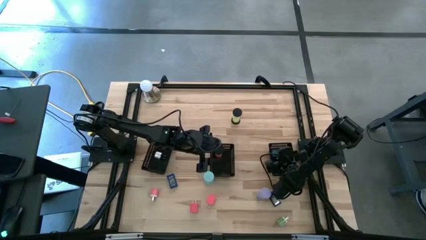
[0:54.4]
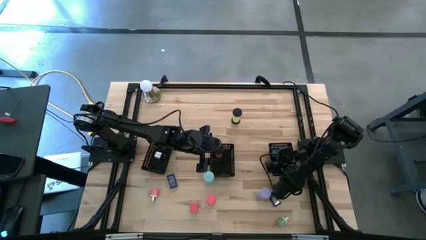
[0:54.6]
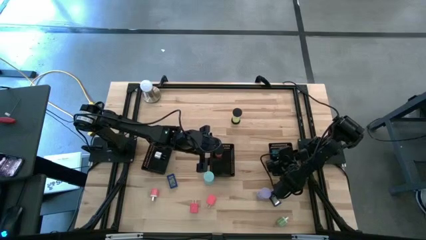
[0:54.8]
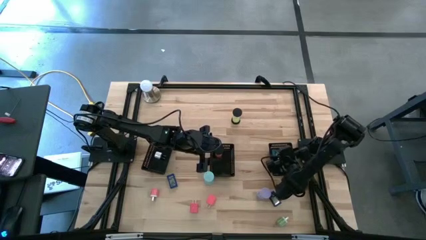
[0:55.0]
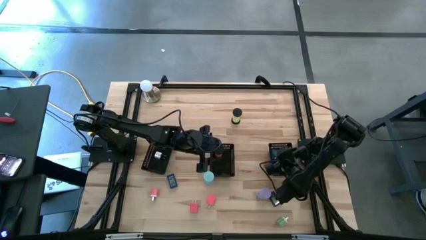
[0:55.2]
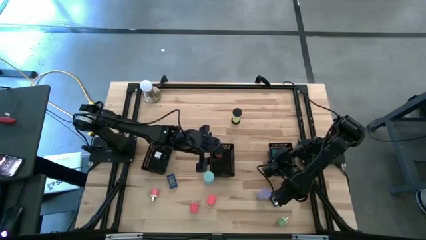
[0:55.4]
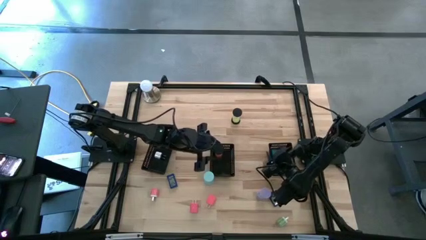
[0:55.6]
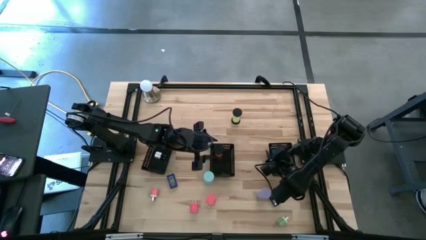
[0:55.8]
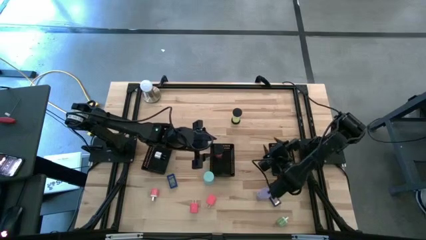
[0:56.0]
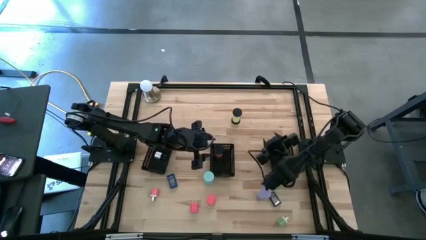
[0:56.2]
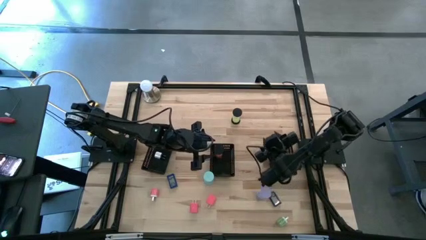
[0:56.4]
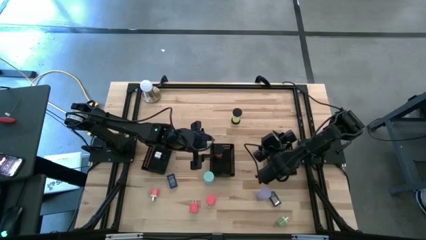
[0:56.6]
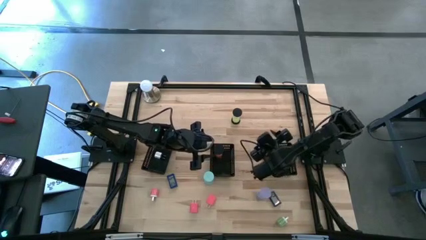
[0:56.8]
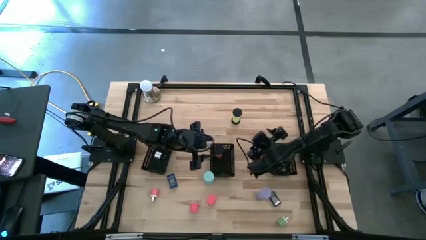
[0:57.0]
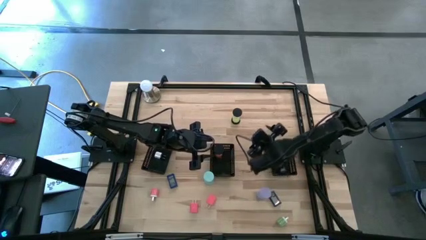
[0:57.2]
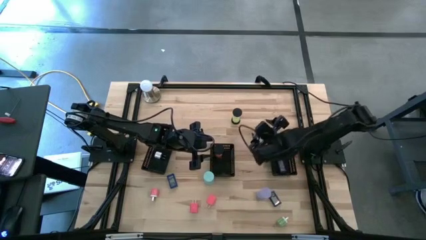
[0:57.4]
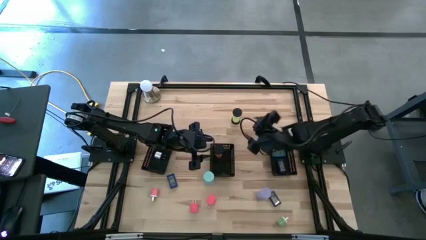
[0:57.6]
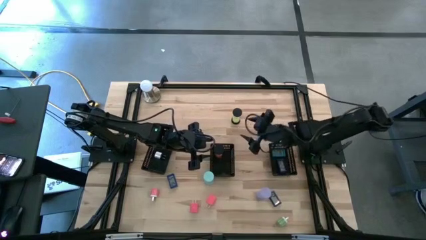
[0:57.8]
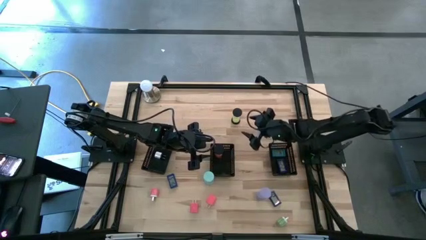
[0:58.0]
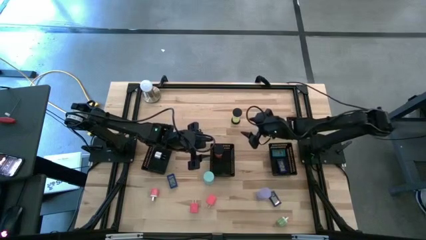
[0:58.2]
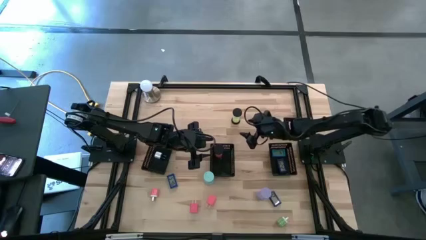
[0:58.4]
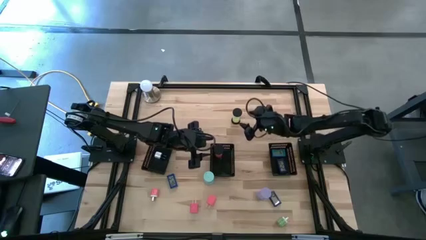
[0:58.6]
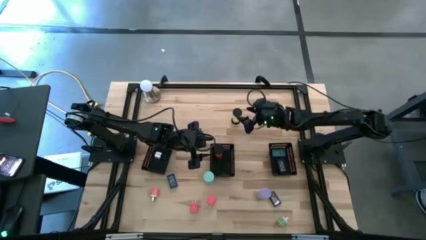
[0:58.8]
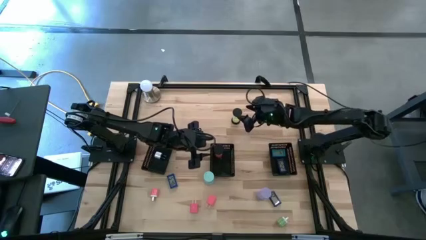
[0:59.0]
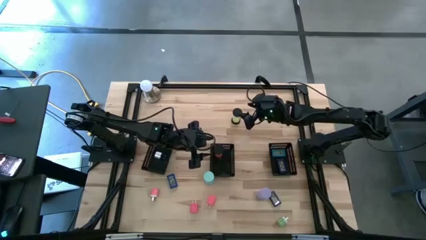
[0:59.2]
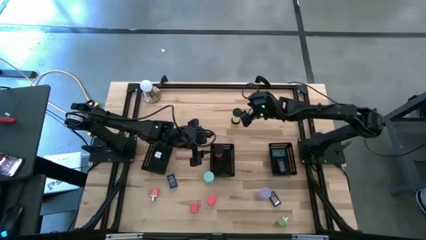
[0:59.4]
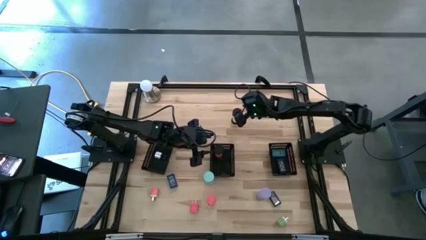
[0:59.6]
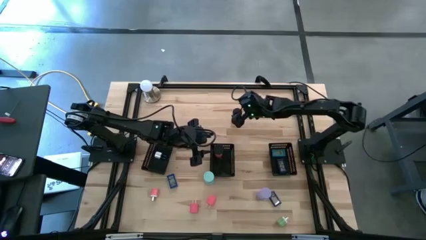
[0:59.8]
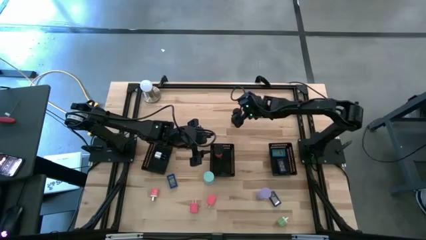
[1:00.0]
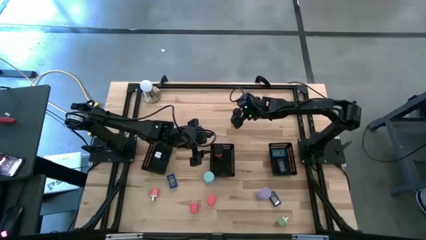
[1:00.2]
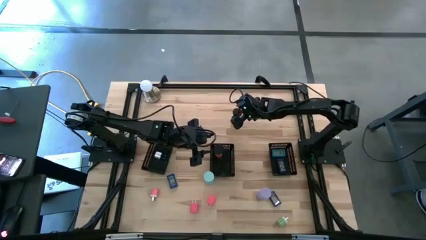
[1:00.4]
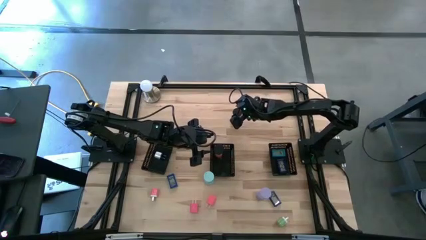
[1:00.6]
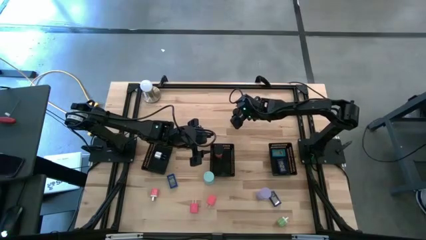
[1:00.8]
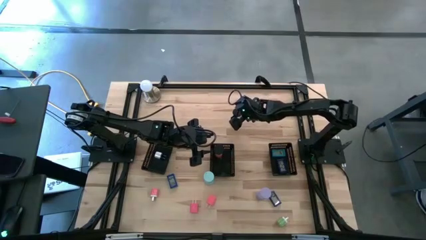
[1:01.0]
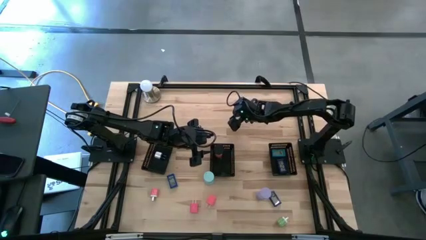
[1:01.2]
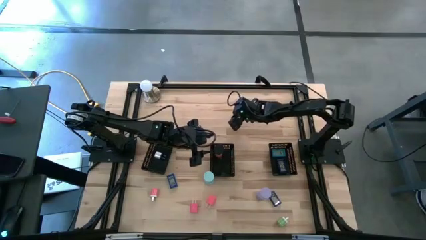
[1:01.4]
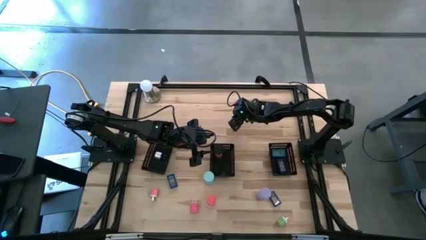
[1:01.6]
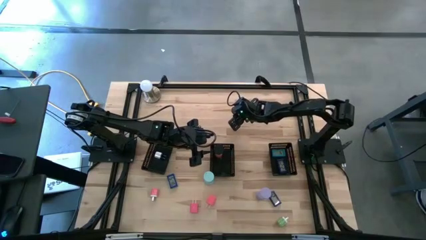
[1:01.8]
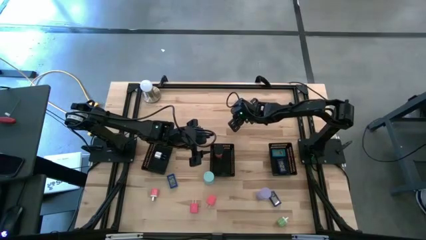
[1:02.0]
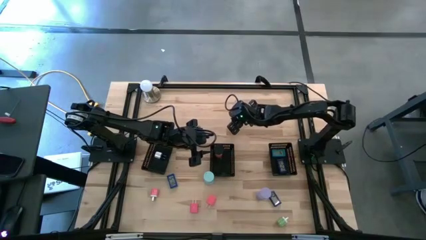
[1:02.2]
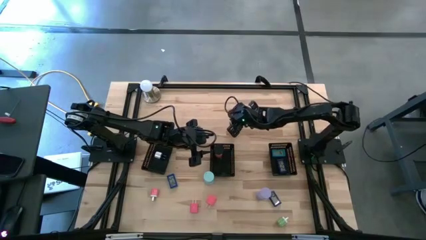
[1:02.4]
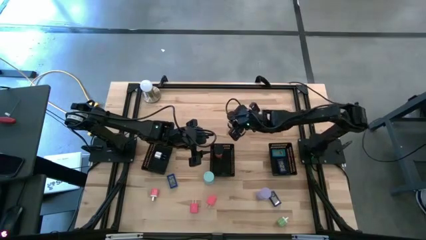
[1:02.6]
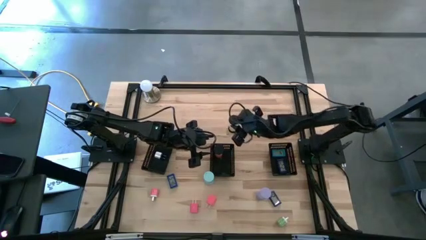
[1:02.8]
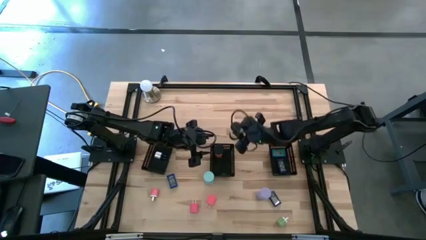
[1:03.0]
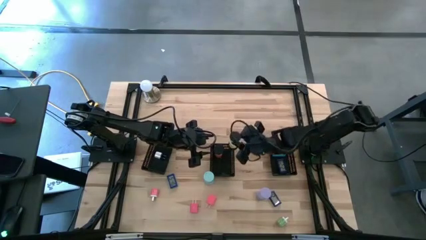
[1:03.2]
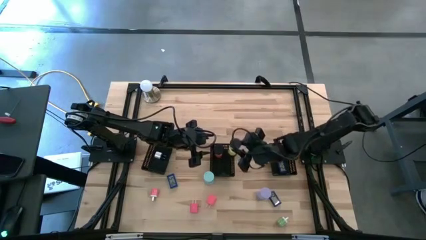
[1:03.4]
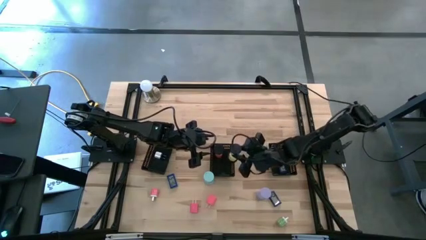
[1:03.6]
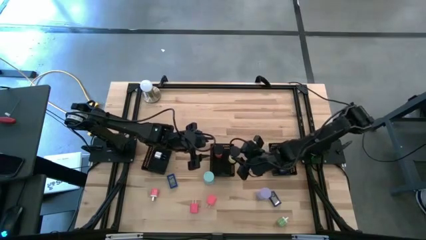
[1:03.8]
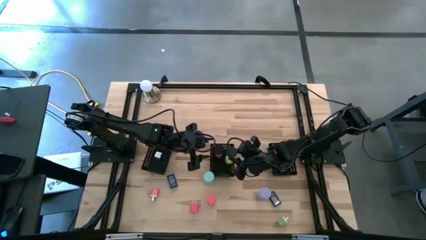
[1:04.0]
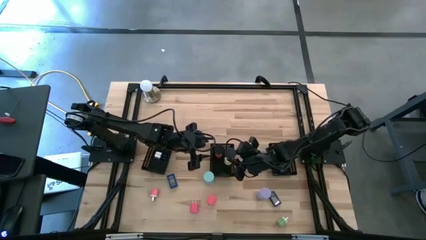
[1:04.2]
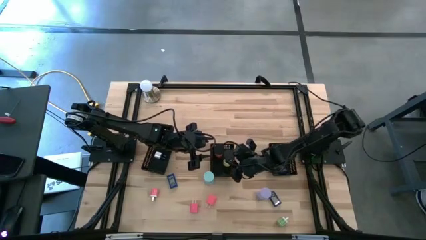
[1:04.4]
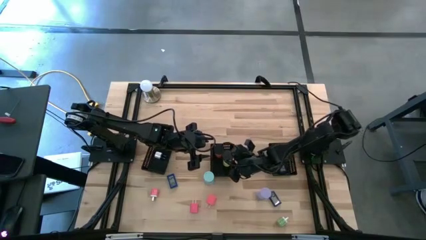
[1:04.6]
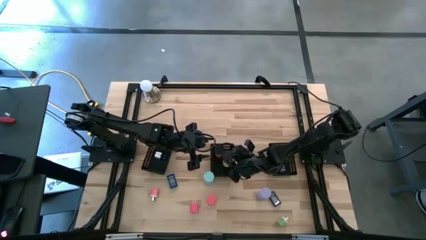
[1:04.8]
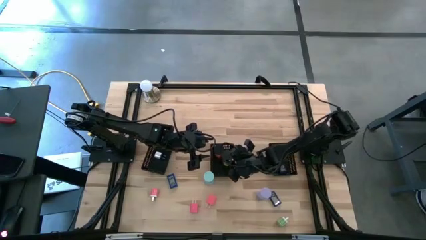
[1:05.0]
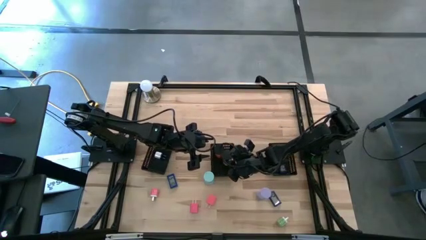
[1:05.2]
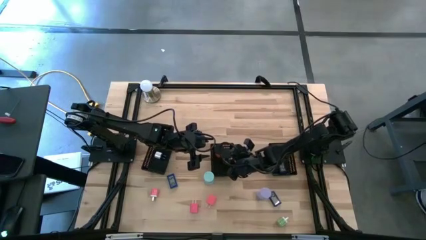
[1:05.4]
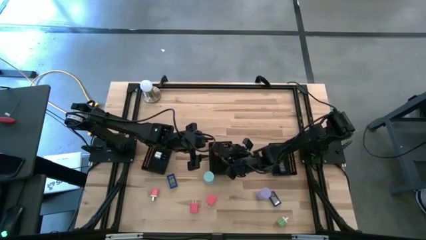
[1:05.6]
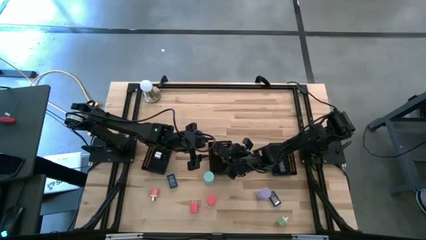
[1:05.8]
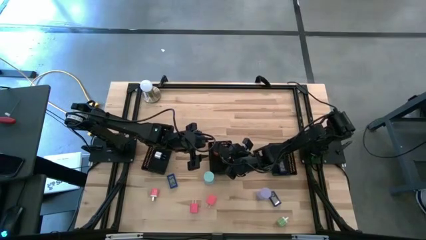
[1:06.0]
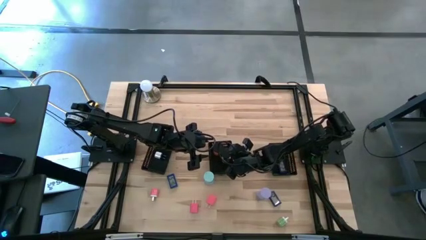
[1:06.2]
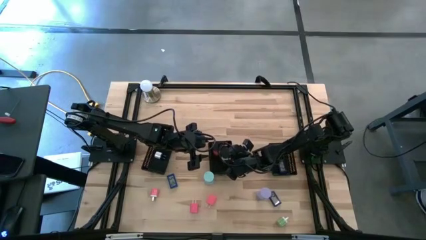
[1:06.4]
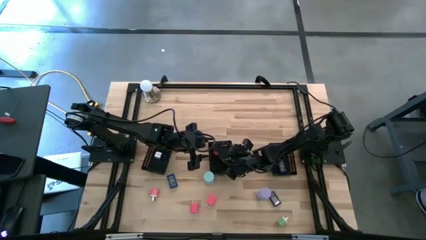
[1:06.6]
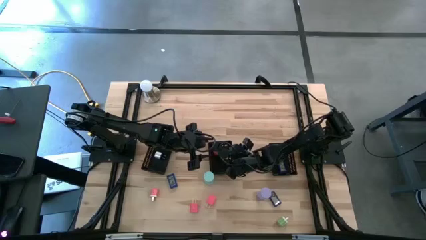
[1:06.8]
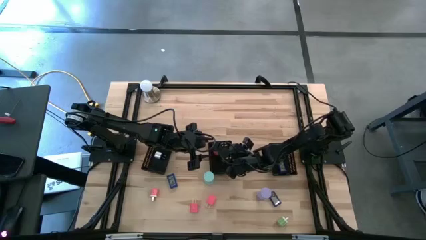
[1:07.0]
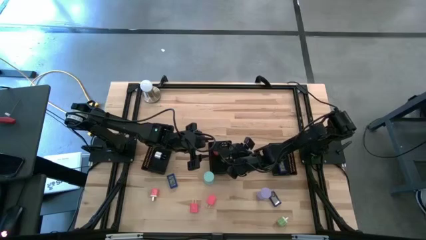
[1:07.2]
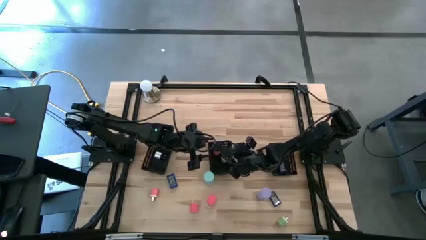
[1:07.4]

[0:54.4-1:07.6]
Task: Pick & Place Office items
Put the yellow hourglass into the middle black bin

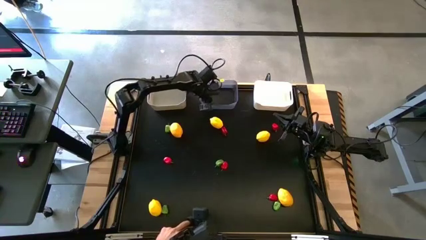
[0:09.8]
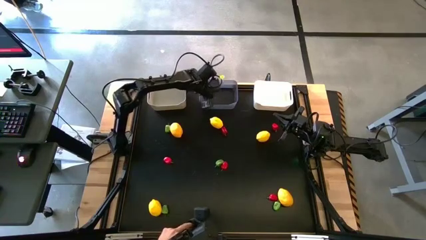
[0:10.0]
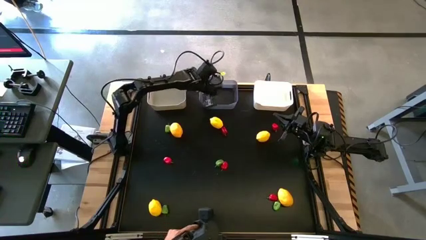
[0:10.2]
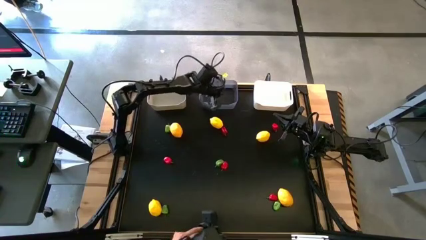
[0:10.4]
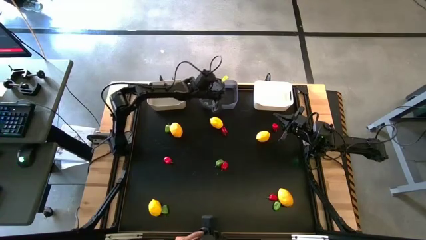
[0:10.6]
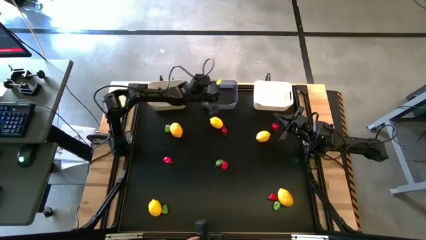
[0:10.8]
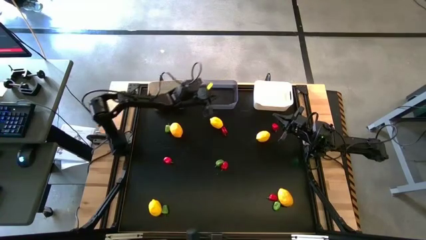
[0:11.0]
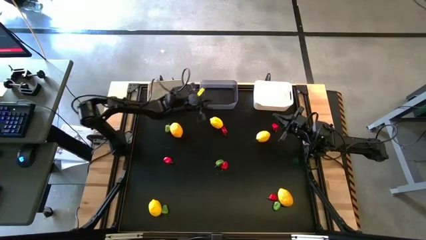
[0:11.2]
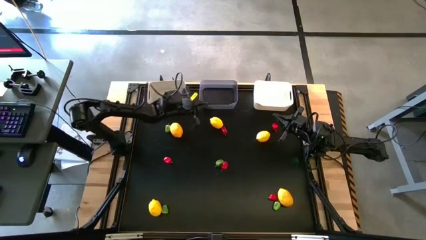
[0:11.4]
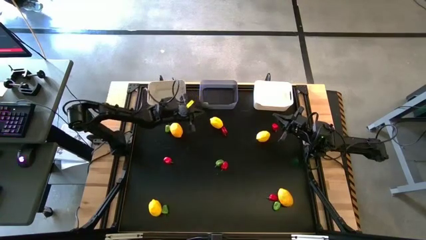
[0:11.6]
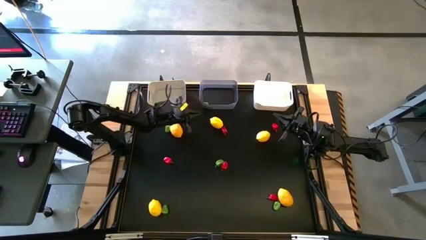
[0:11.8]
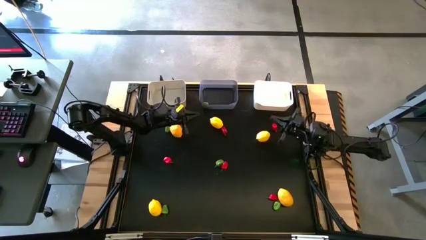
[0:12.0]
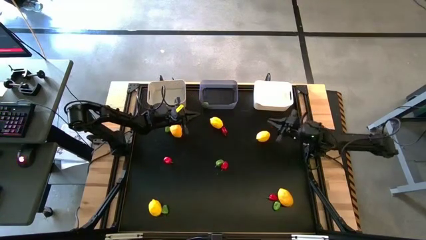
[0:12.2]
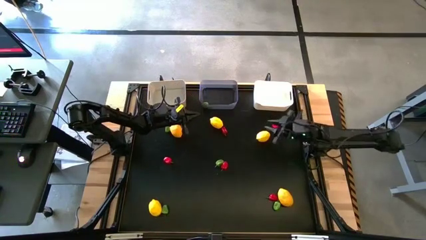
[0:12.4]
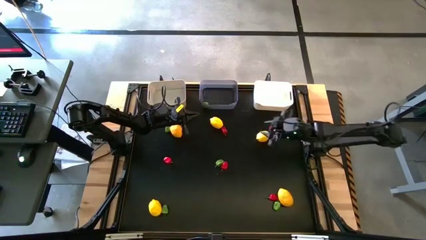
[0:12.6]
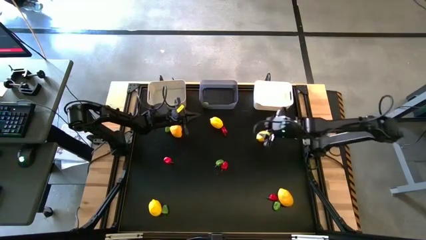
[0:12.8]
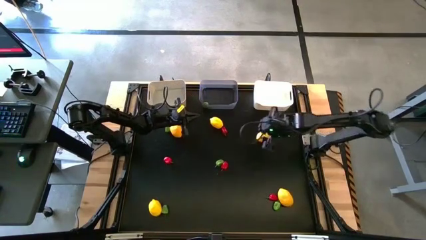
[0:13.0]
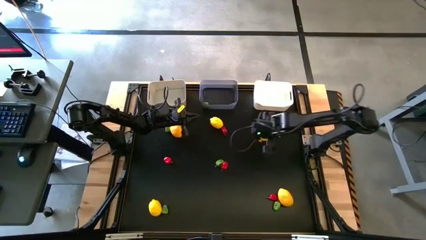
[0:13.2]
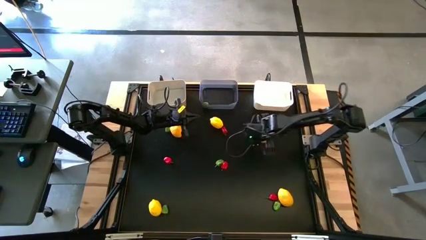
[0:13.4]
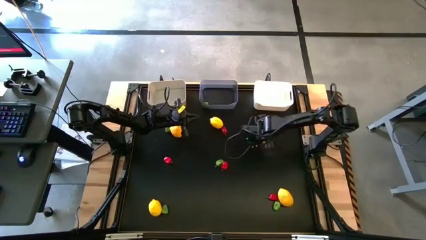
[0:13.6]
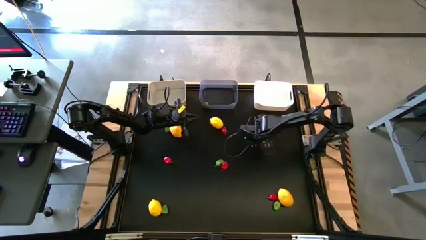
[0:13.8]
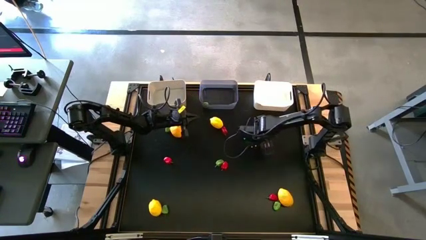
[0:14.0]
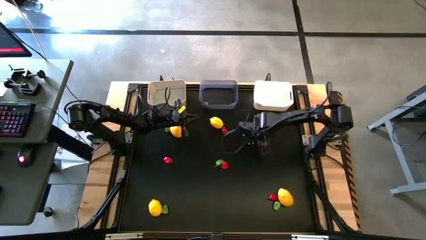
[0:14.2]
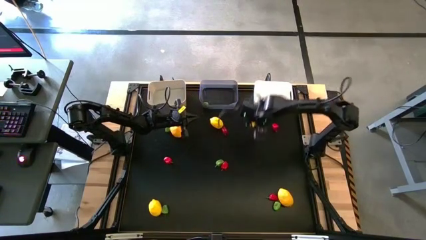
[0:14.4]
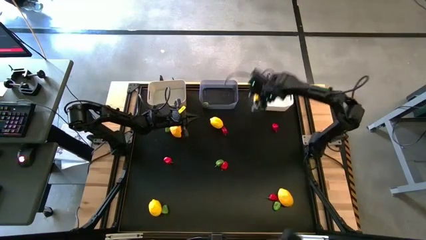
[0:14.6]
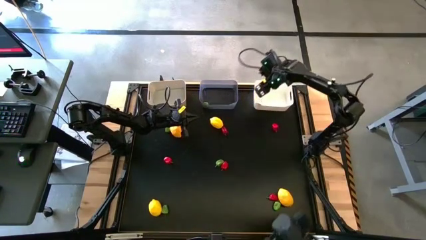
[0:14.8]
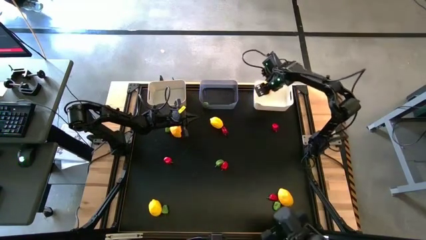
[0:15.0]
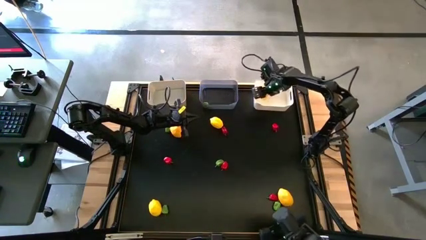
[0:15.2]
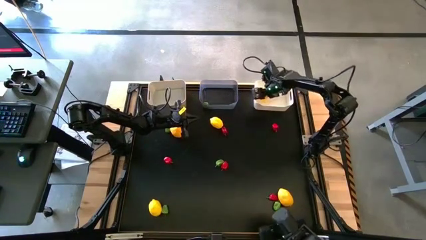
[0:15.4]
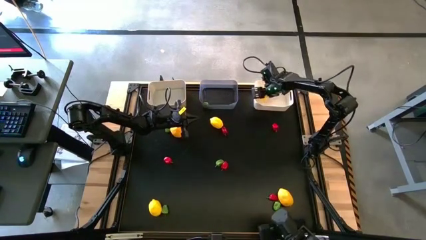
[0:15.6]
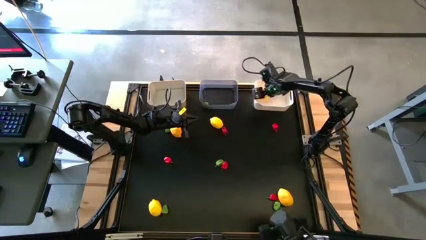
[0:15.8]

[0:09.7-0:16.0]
Task: Sort produce into baskets
Put the lemon into the white bin
